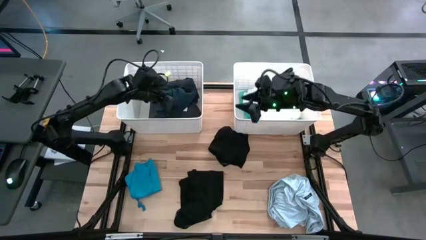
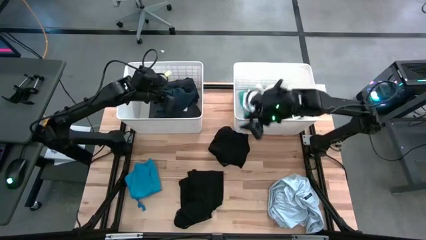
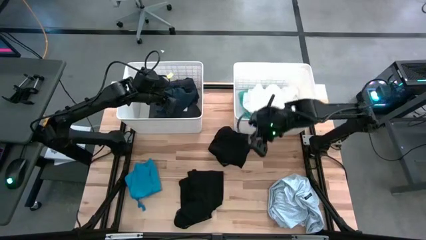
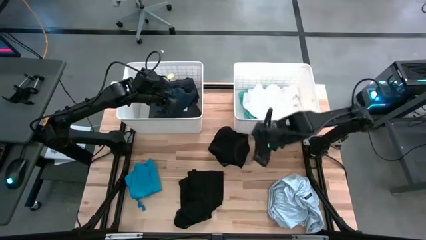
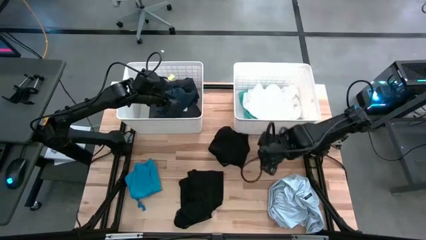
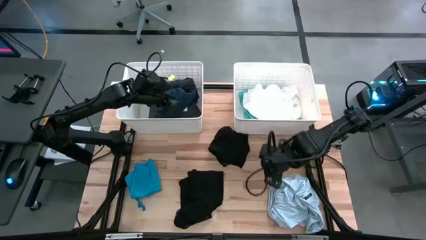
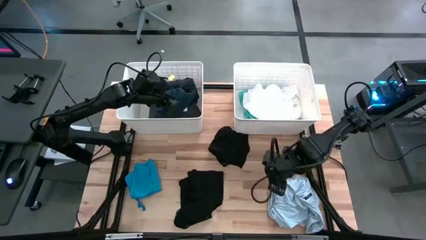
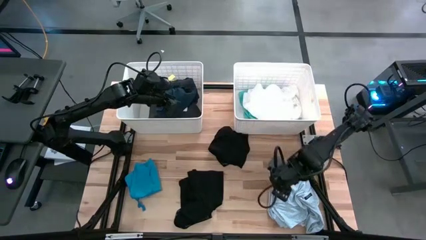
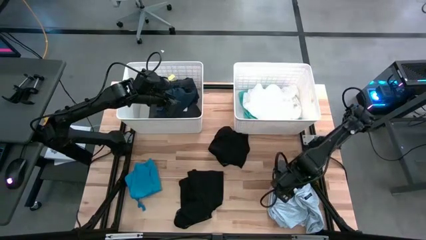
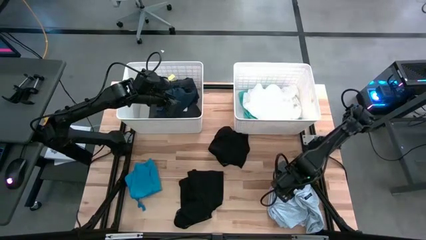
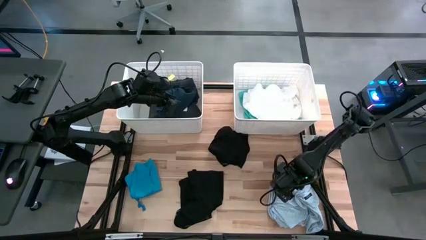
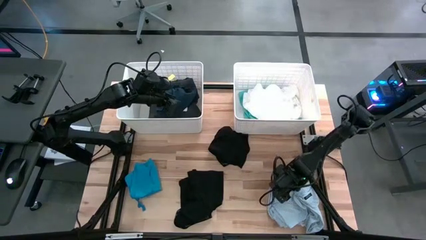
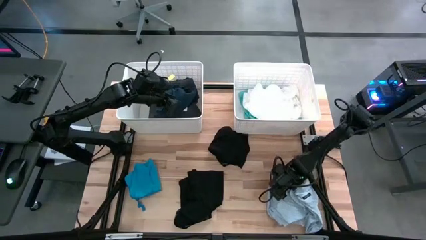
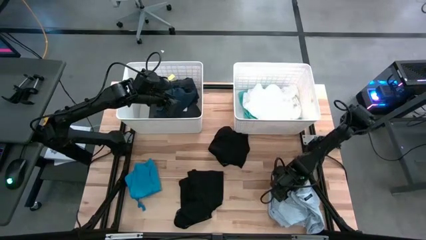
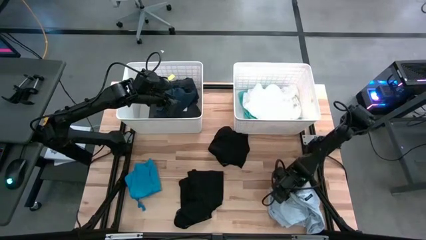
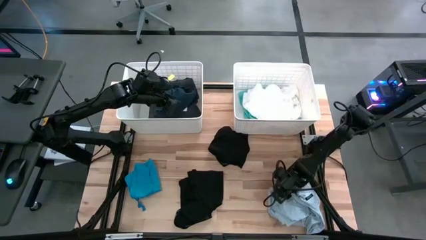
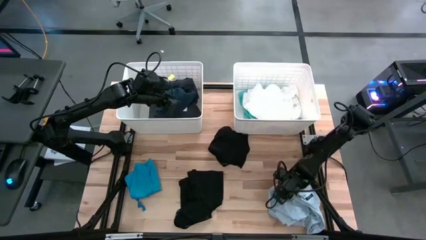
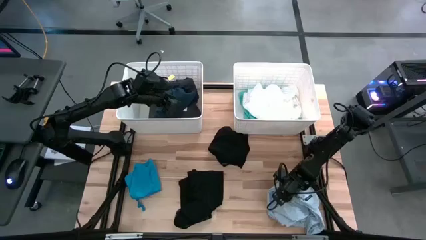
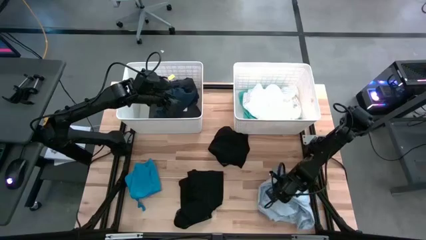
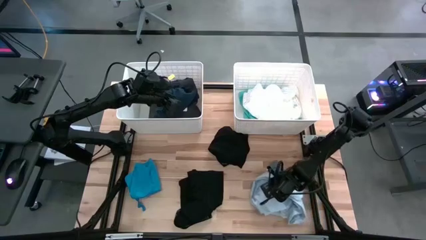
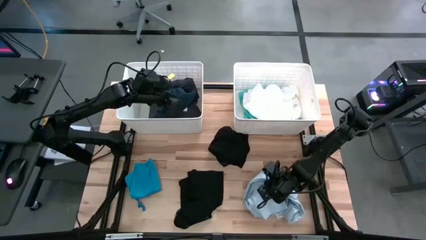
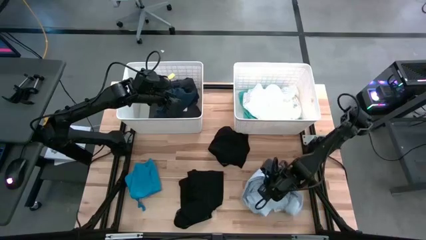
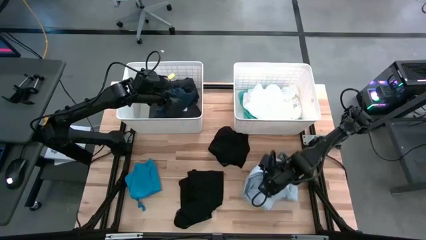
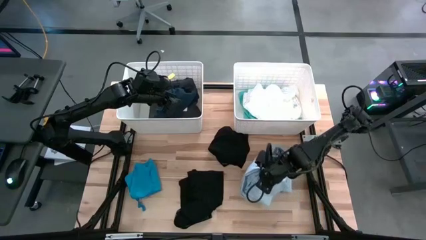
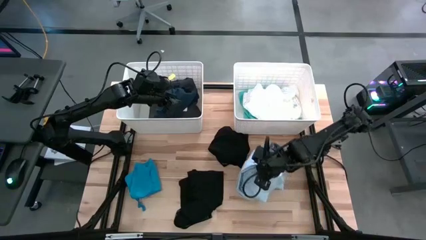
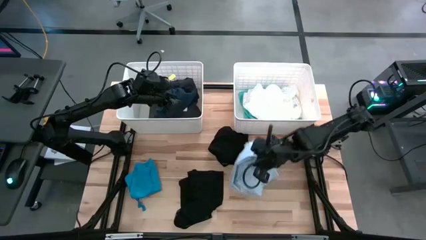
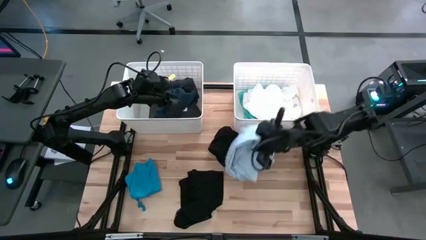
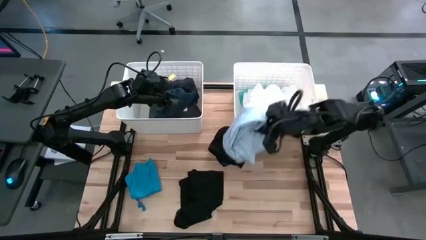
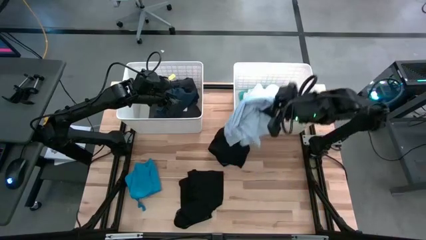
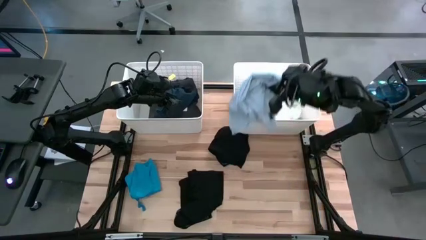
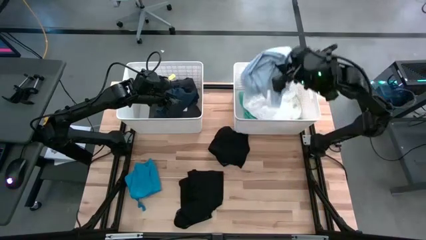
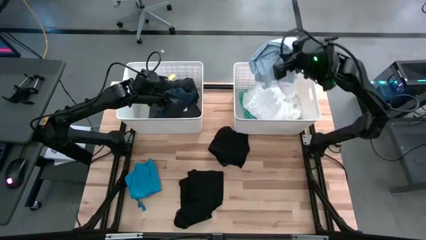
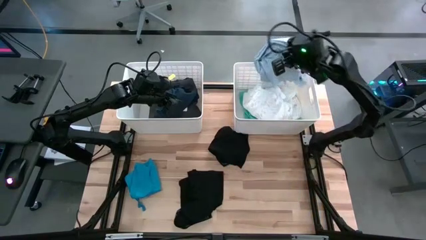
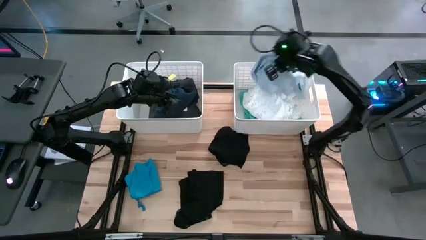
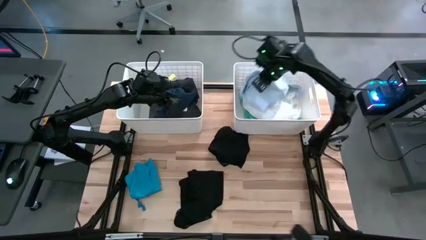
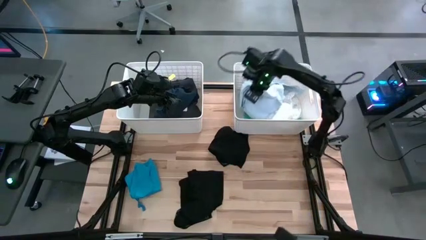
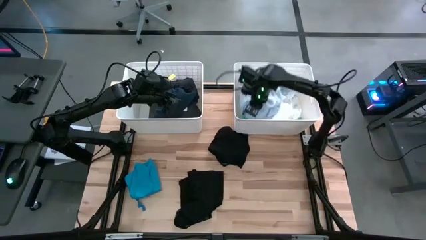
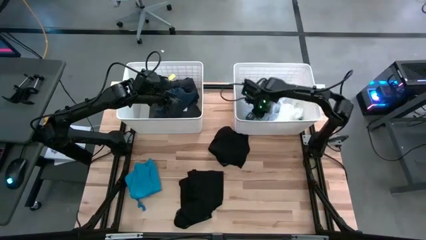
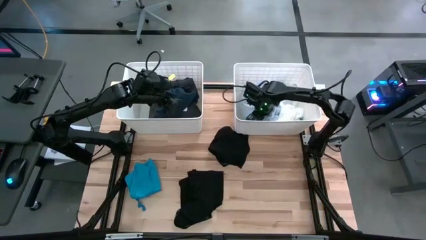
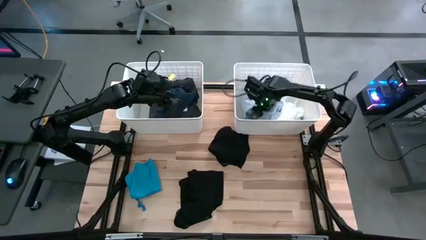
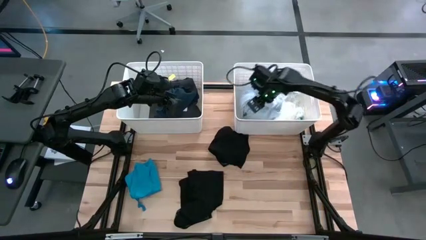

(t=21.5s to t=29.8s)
Task: Sort clothes
Put the white patterned shirt into the right bin

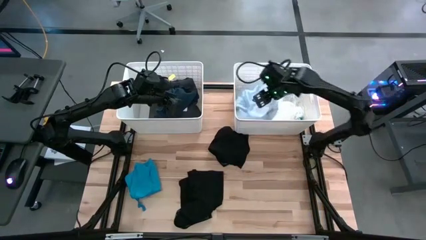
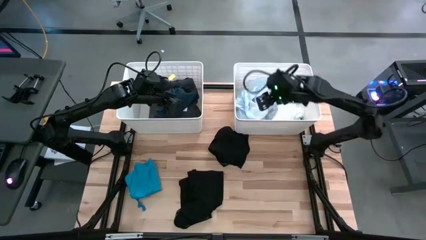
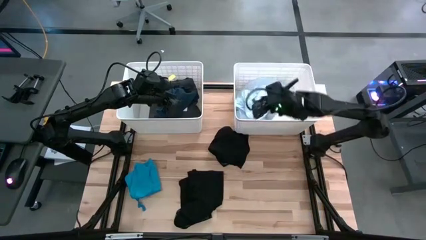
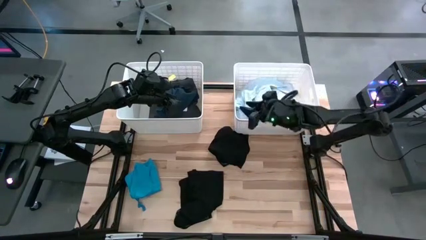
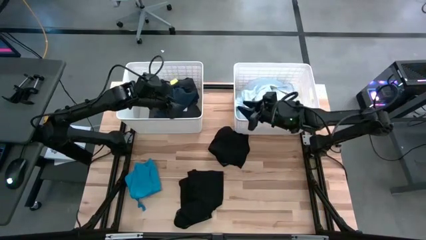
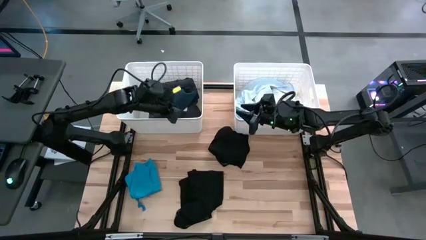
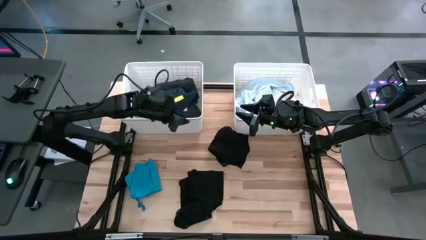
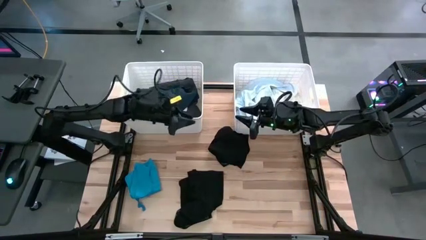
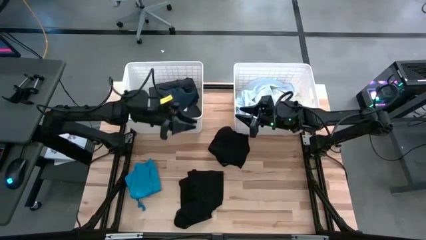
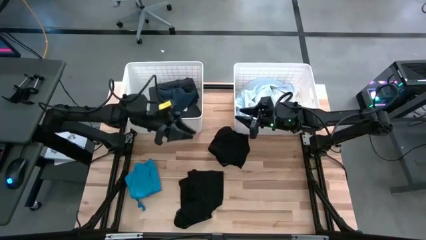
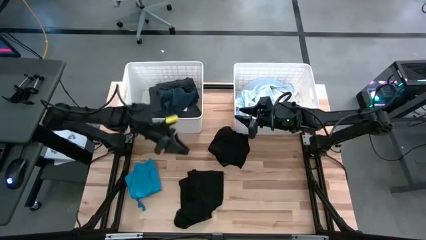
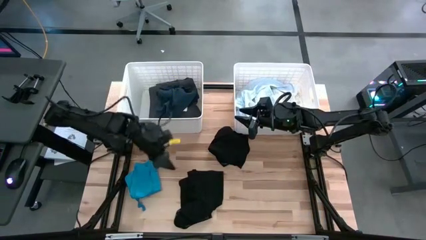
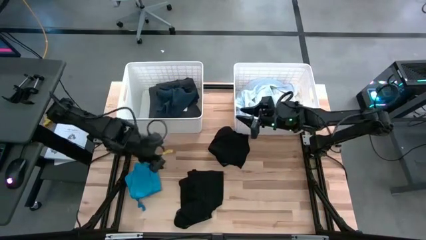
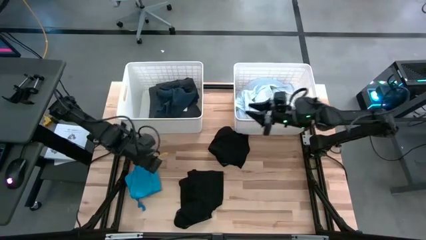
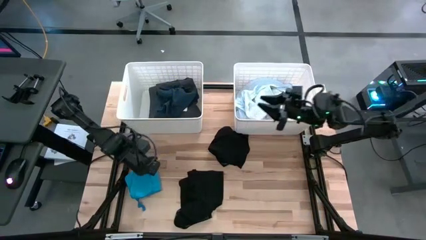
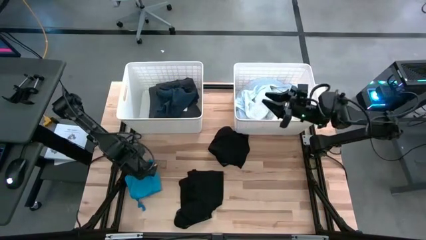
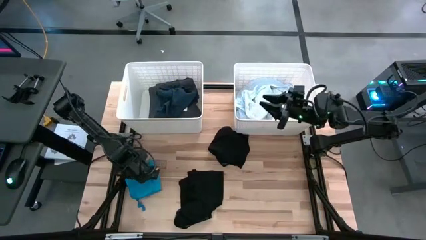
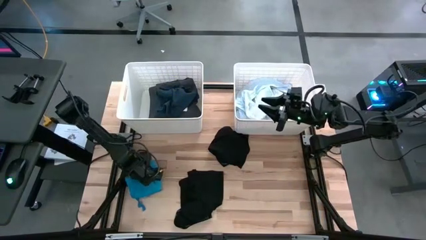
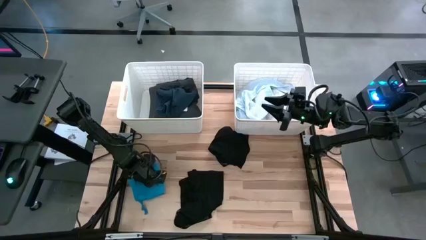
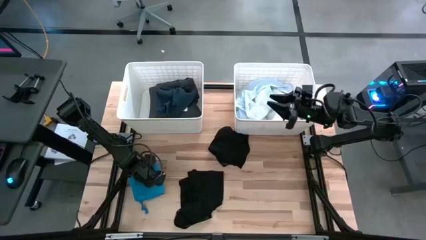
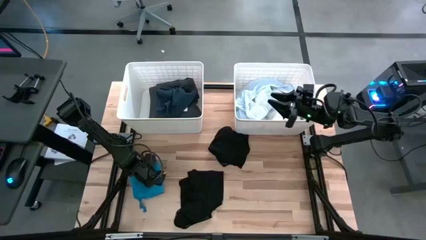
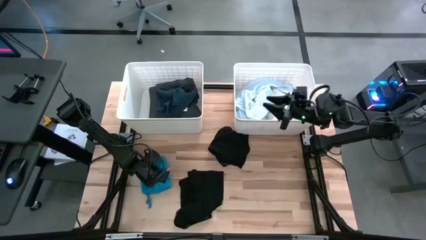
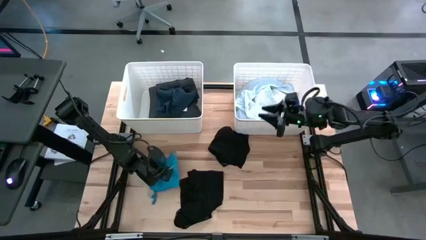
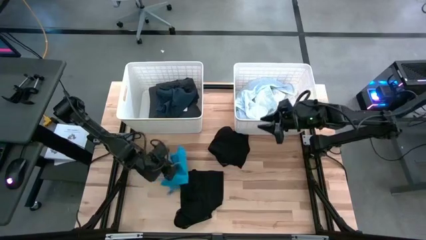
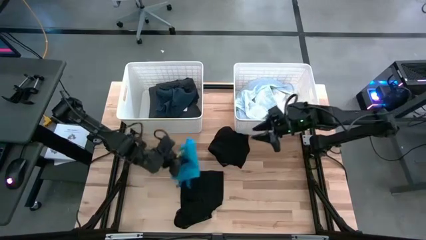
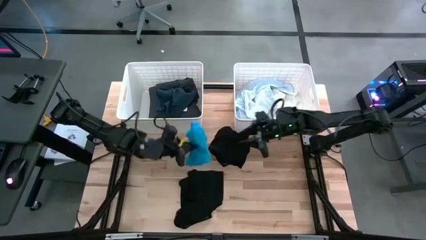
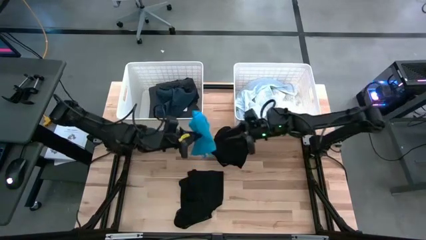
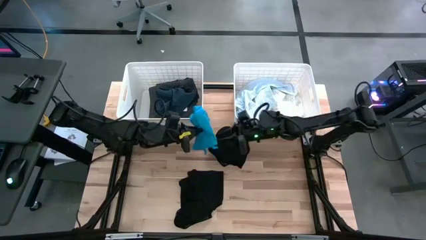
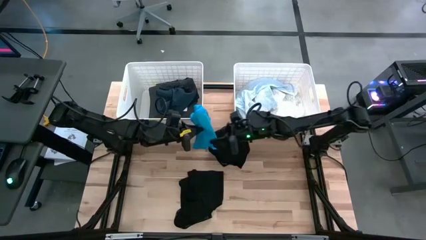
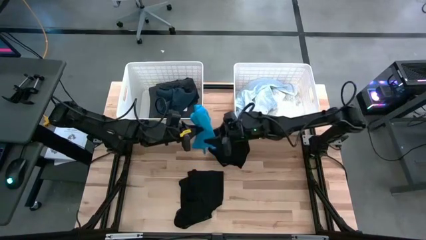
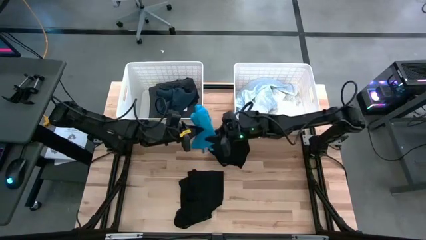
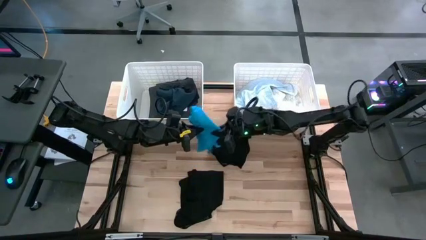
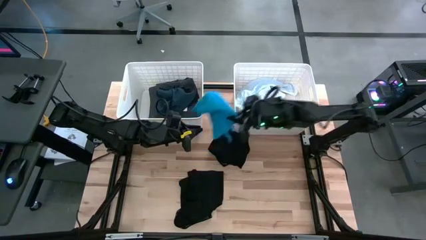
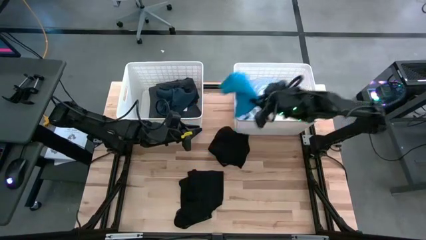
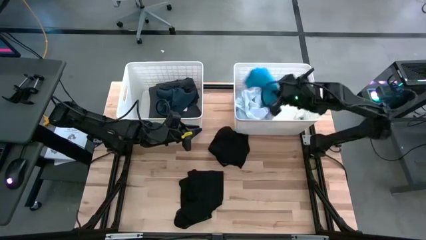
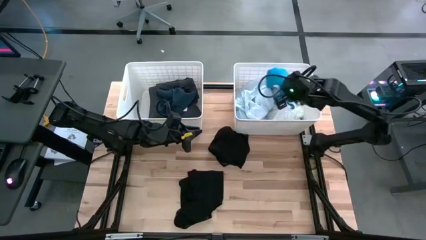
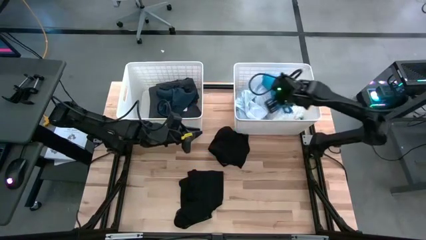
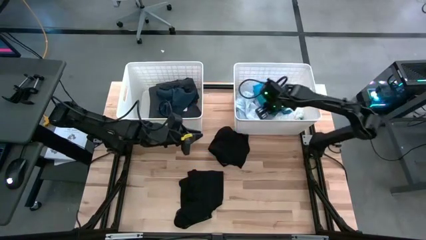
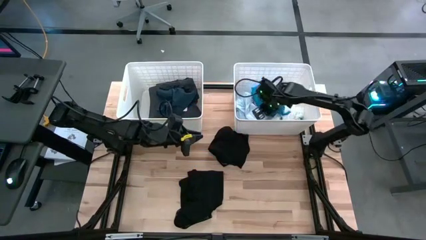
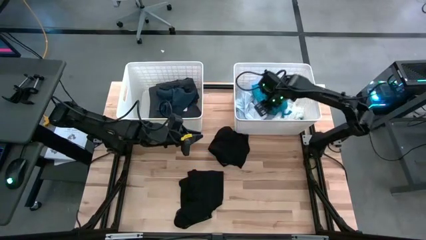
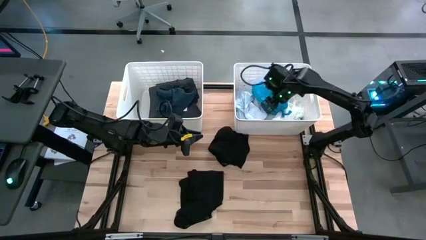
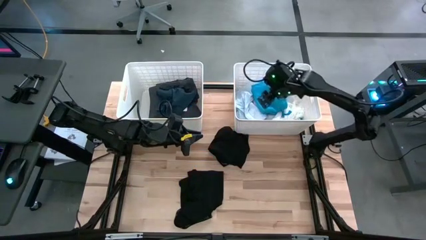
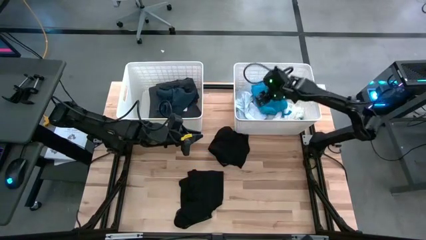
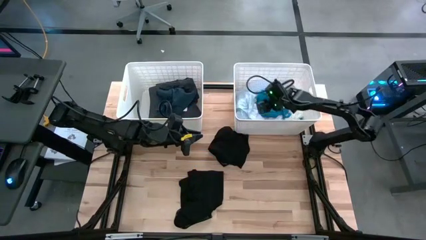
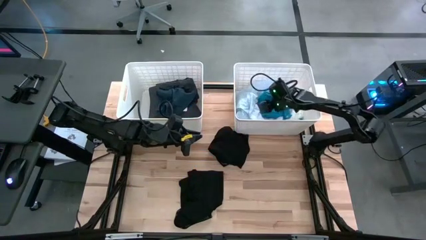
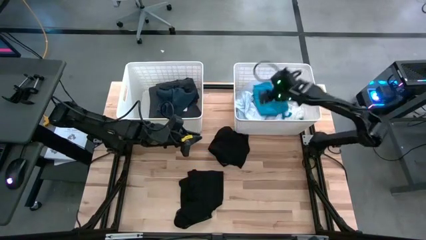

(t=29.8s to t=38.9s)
Put the blue shorts into the right bin
